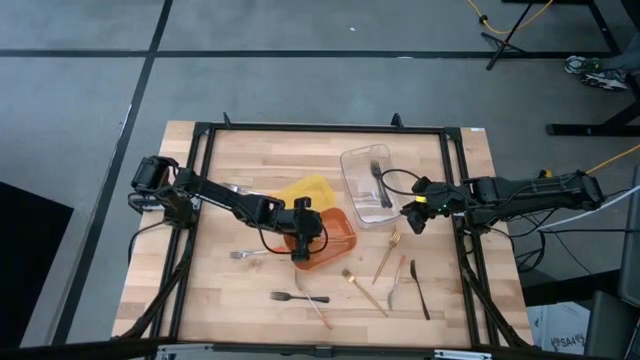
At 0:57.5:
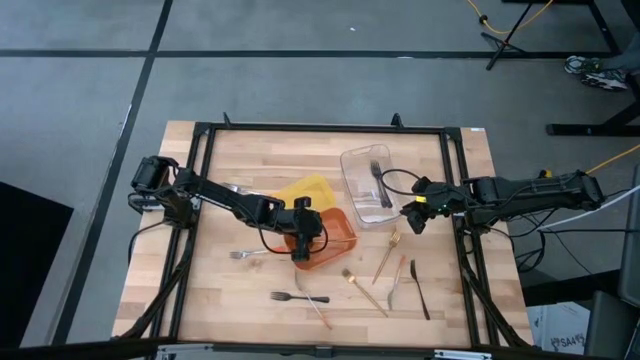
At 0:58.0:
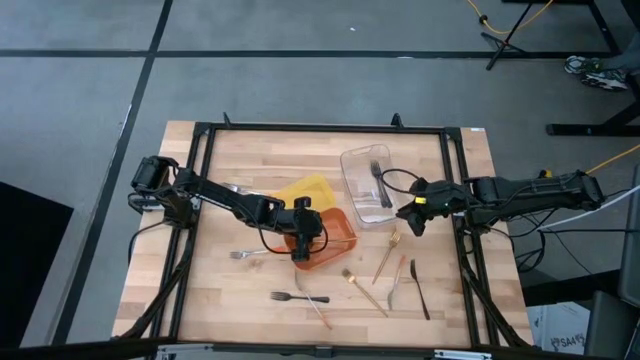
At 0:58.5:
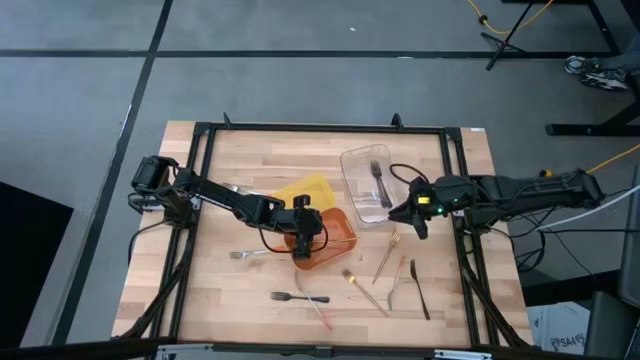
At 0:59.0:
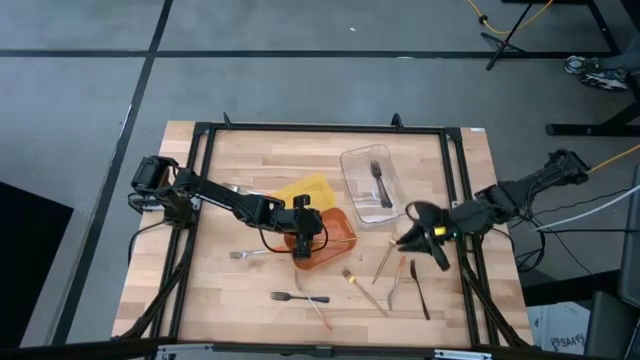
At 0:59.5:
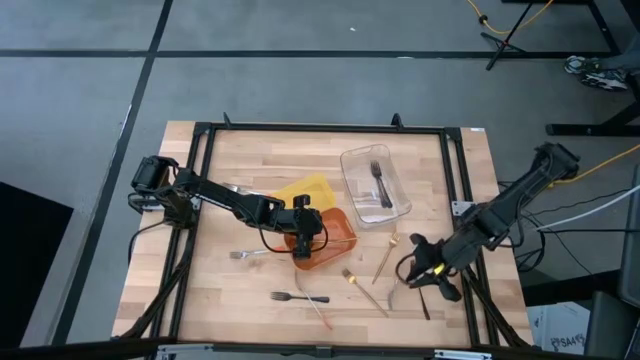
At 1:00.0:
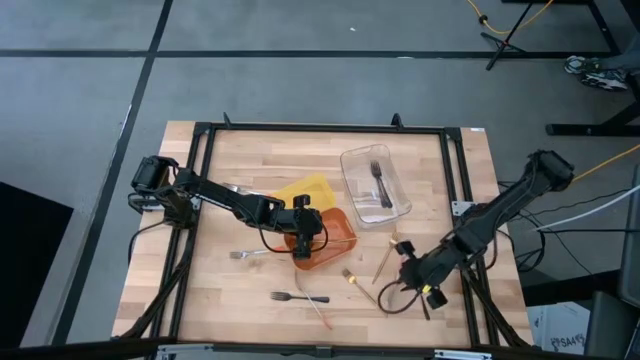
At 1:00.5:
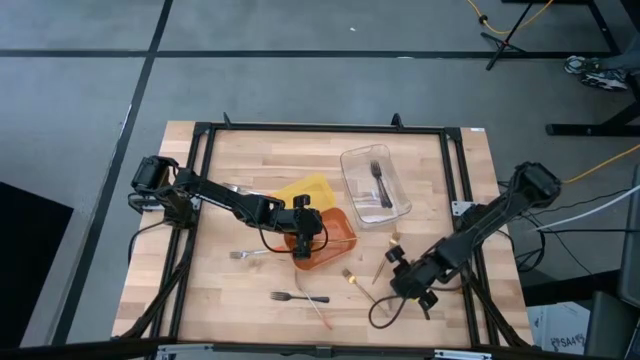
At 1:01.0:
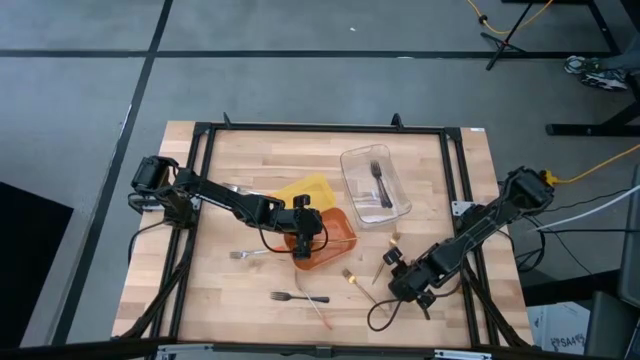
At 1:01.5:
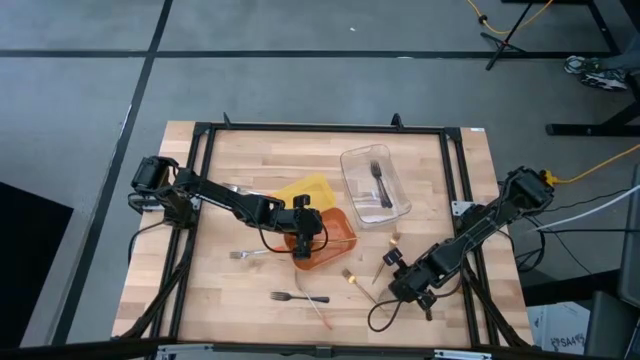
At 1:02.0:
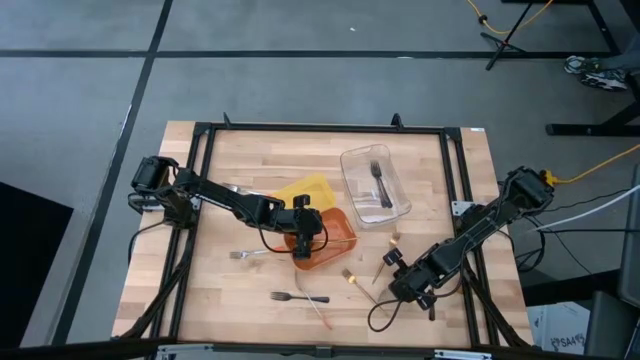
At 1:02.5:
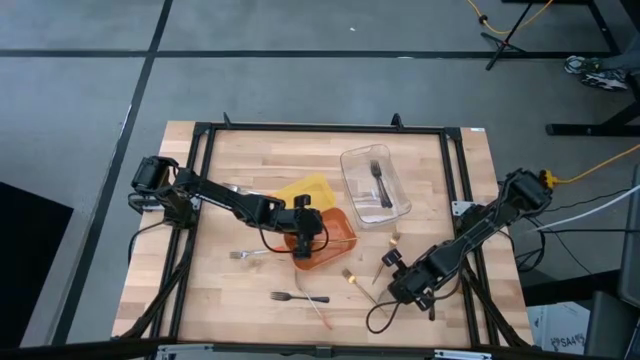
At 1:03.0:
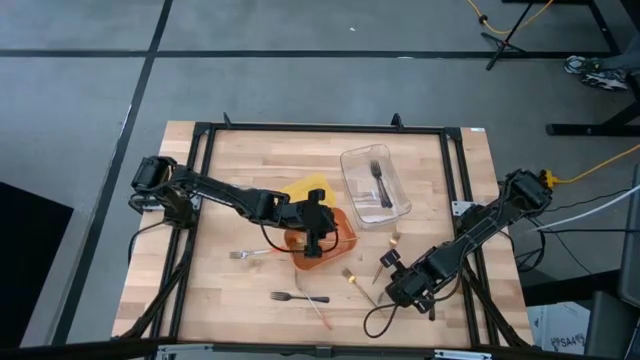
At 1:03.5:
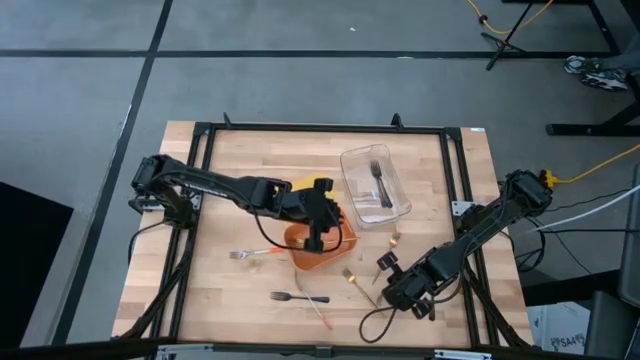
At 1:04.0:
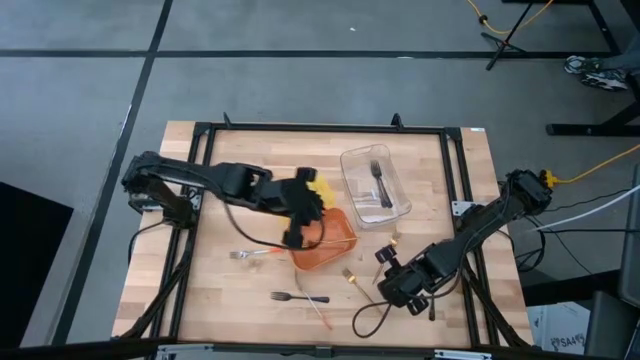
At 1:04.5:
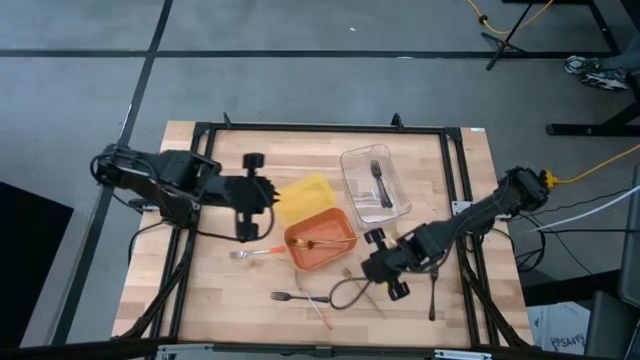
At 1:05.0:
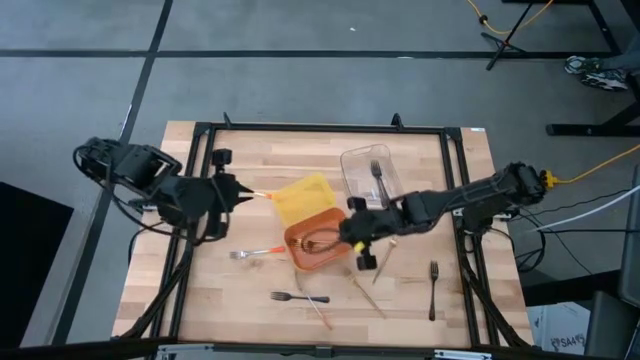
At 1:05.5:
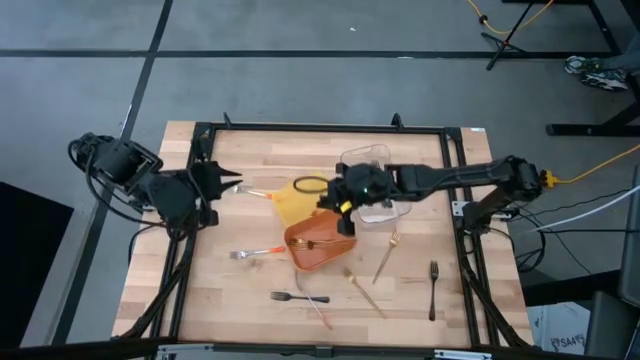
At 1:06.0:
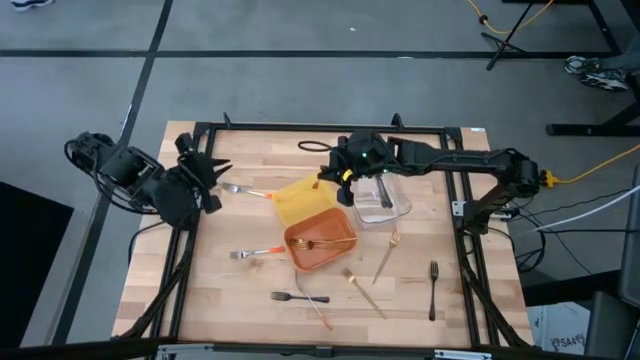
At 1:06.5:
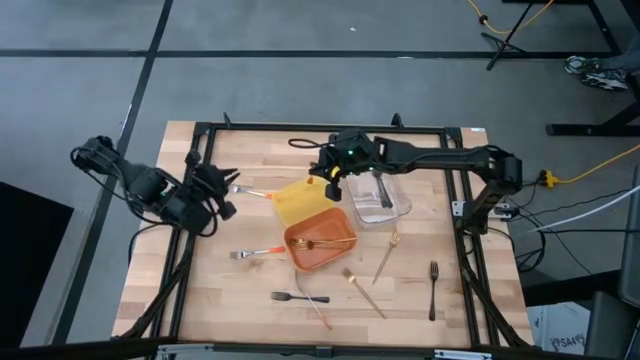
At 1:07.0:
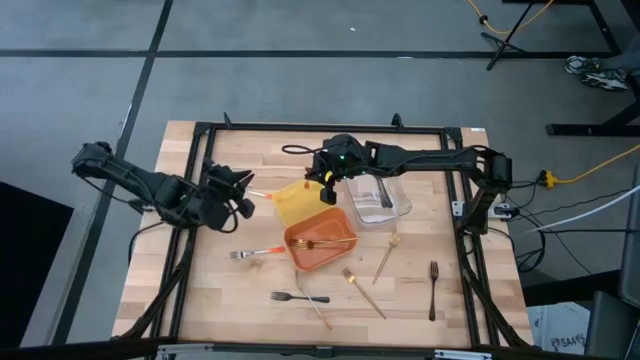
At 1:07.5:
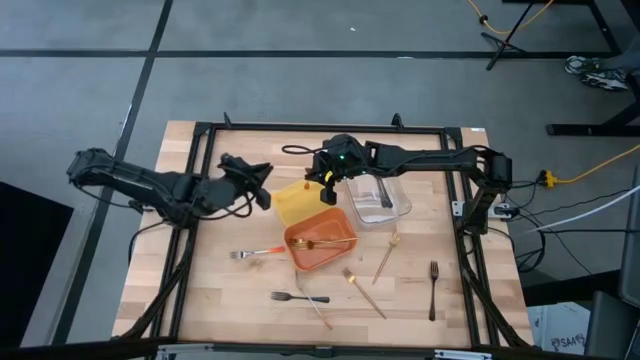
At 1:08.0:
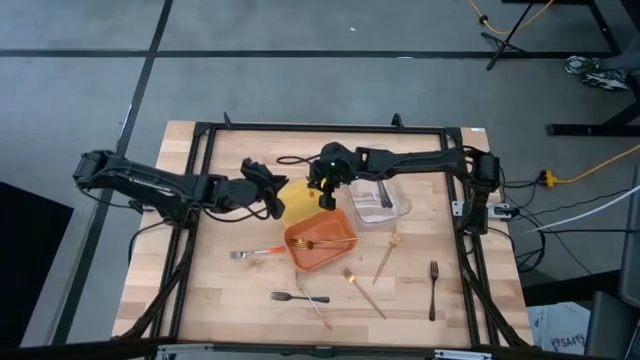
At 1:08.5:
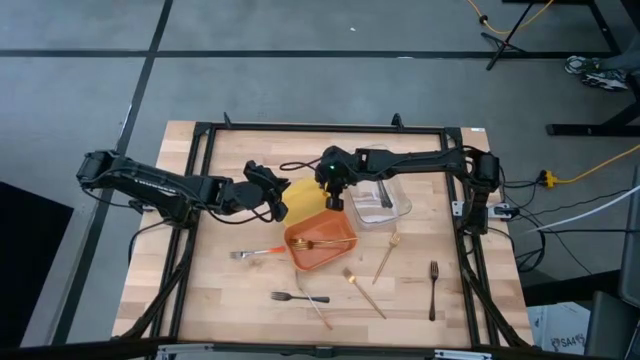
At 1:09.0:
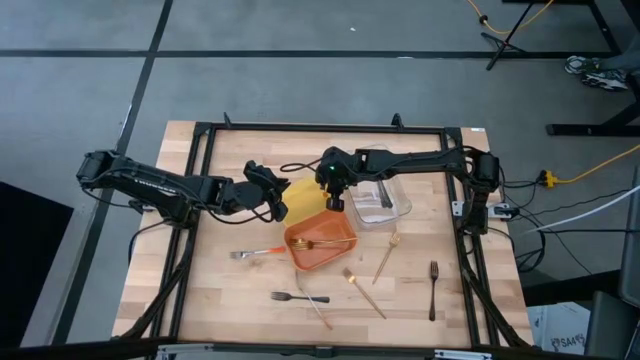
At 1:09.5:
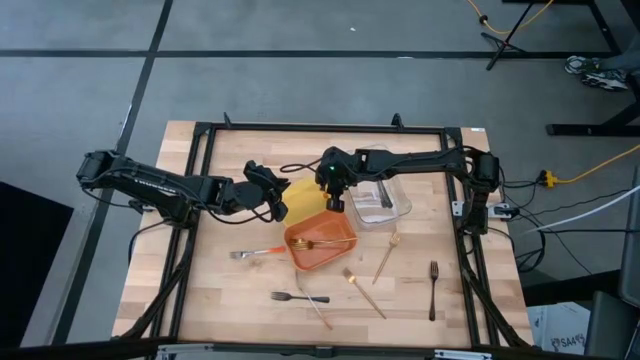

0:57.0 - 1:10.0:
Task: Sort silverware by color (type)
Put the orange fork into the yellow bin
